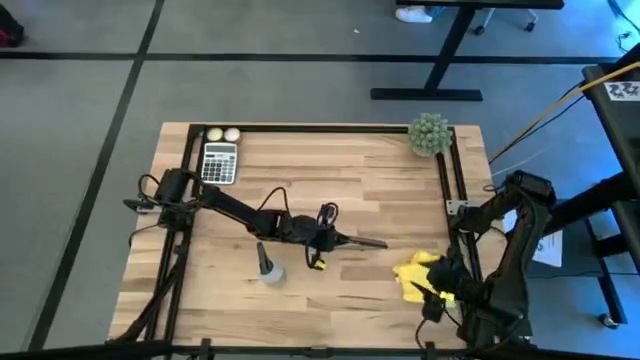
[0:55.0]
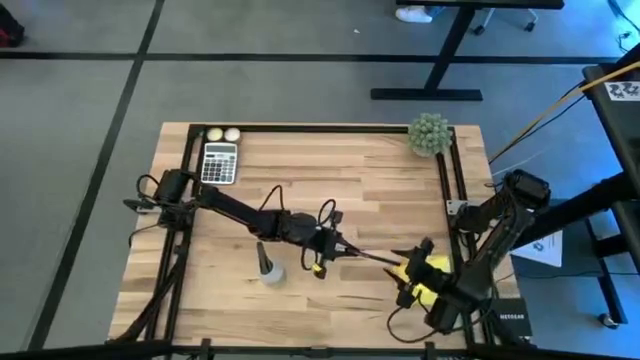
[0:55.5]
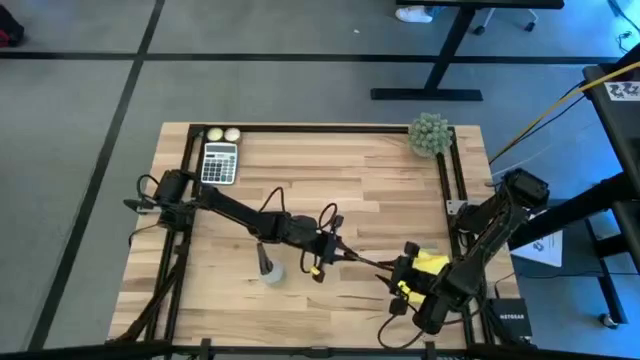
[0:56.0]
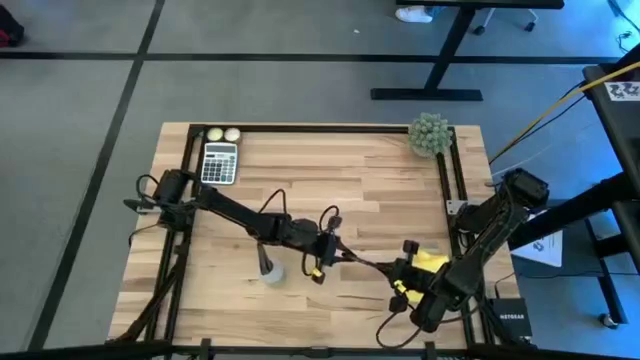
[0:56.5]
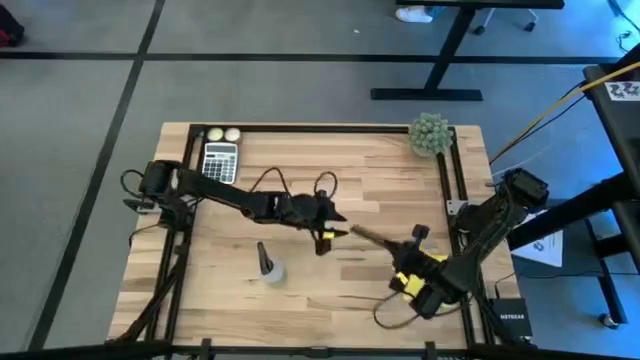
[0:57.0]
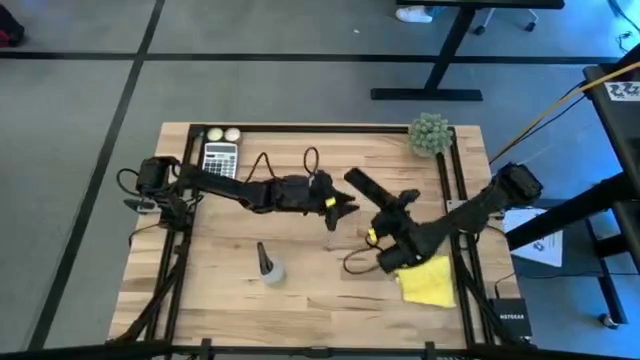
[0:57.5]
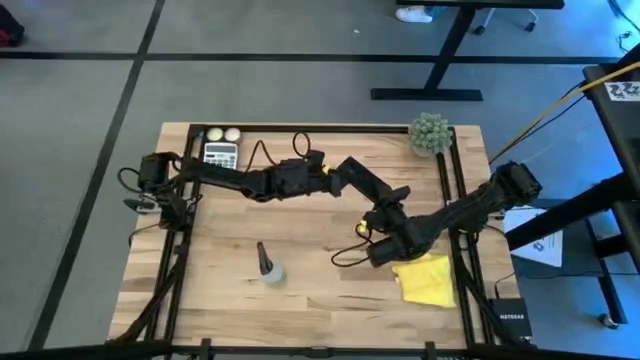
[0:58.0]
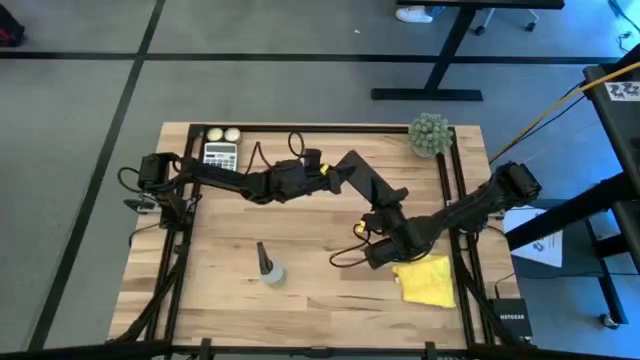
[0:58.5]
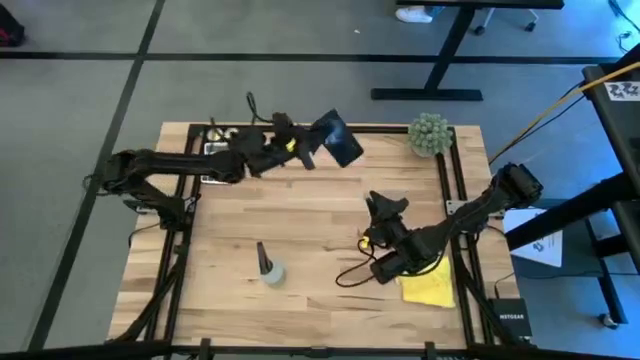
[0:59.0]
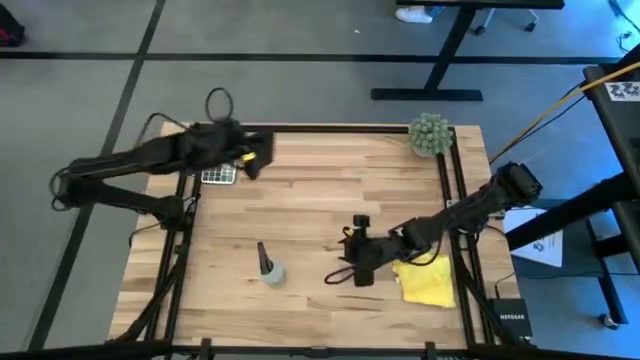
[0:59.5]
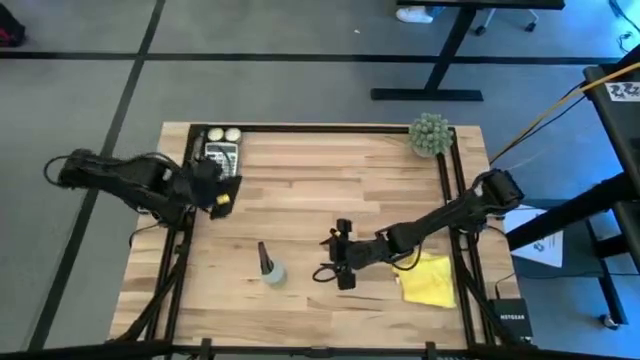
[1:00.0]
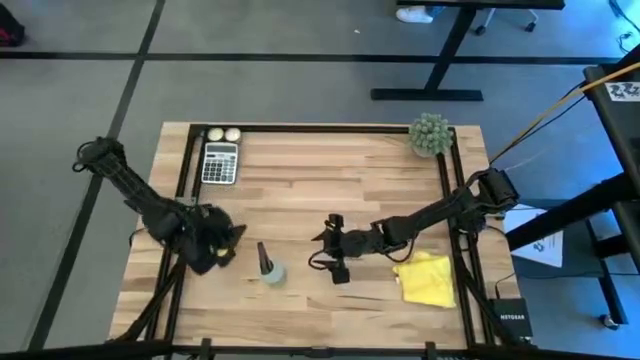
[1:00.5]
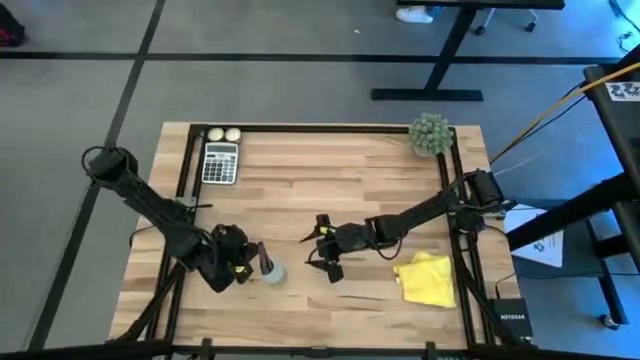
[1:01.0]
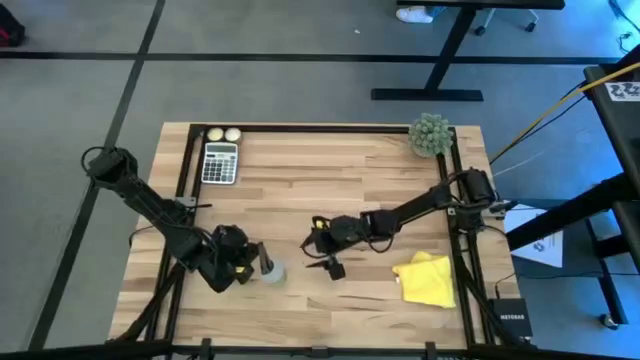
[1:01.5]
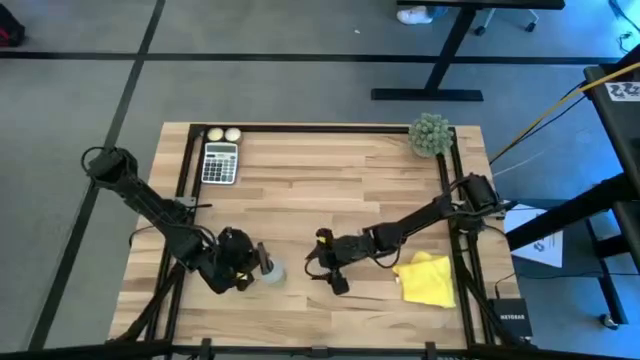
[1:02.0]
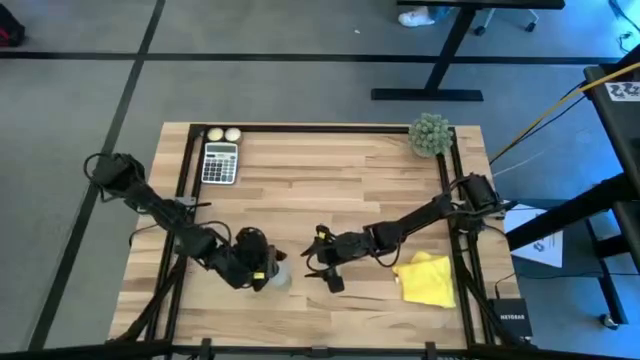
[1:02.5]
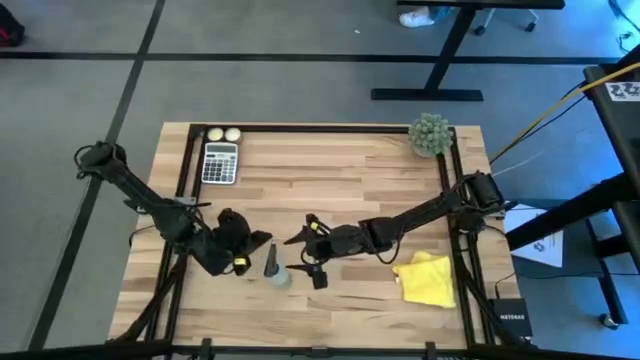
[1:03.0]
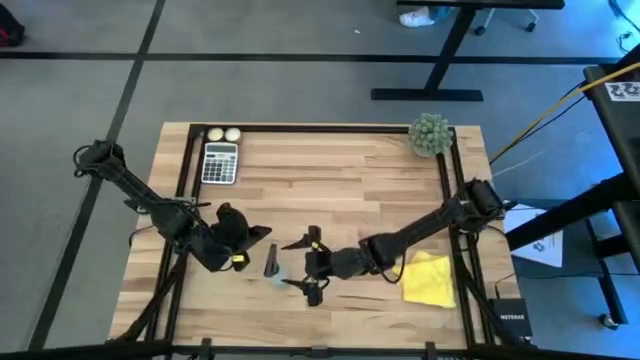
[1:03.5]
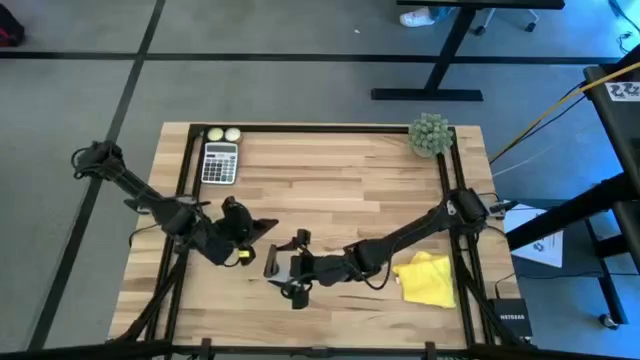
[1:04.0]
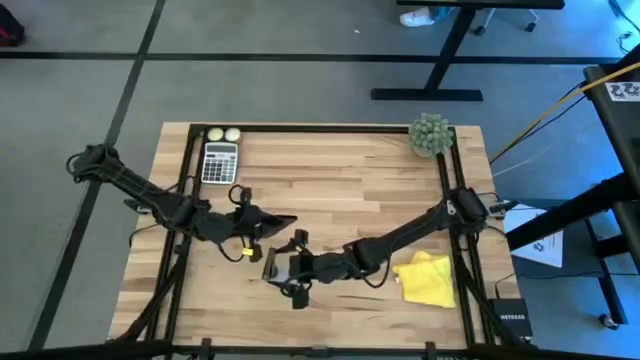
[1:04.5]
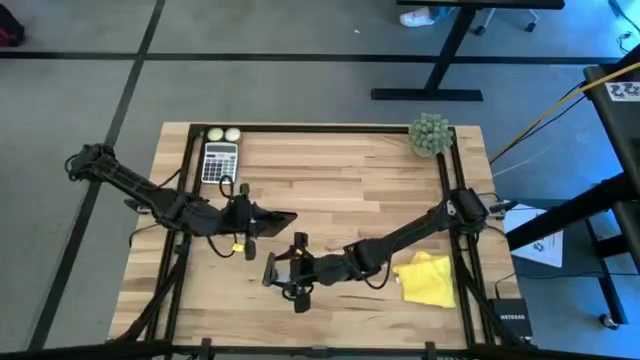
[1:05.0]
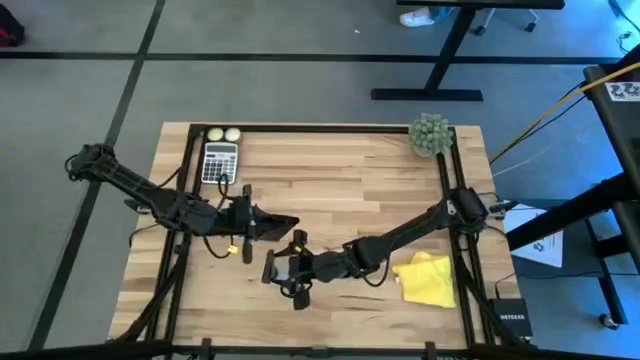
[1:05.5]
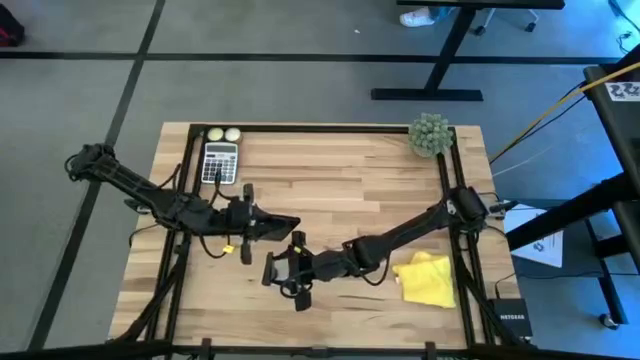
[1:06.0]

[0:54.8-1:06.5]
Task: Apply microfiber cloth
Spray the back of the black cellphone with the bottle cleaner

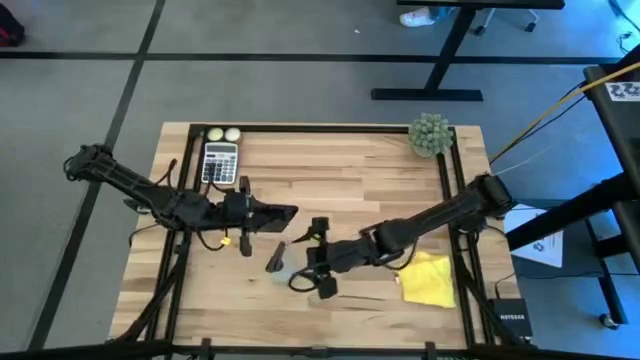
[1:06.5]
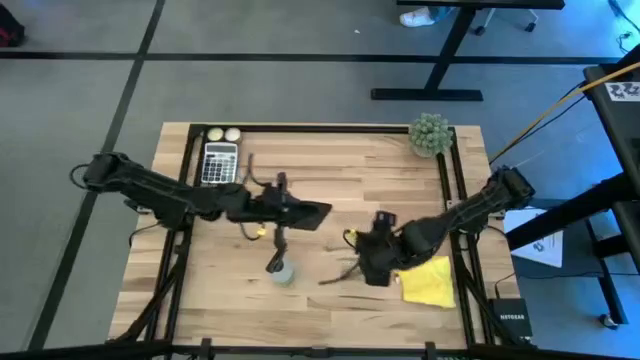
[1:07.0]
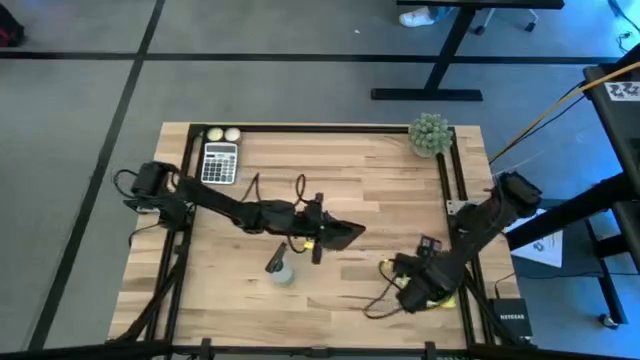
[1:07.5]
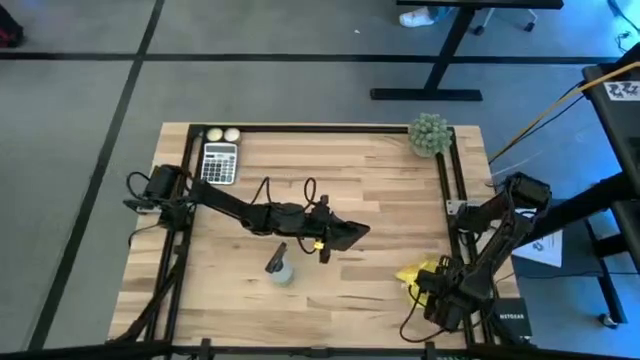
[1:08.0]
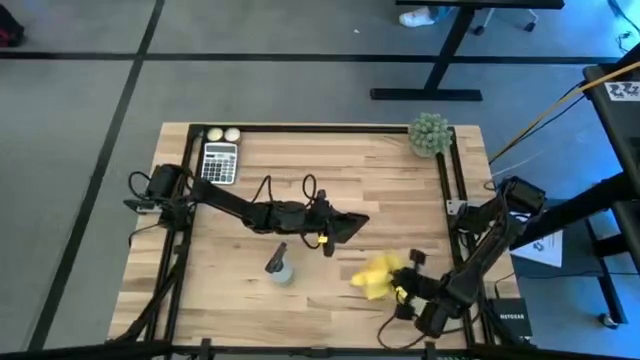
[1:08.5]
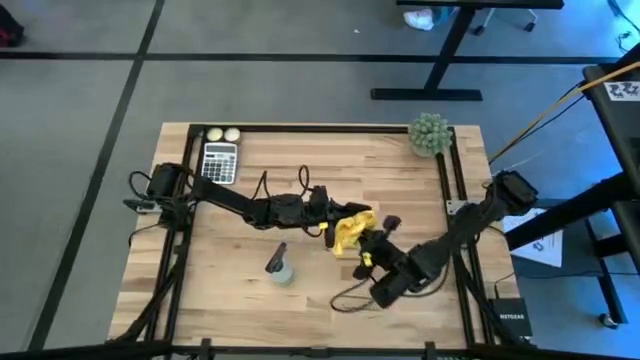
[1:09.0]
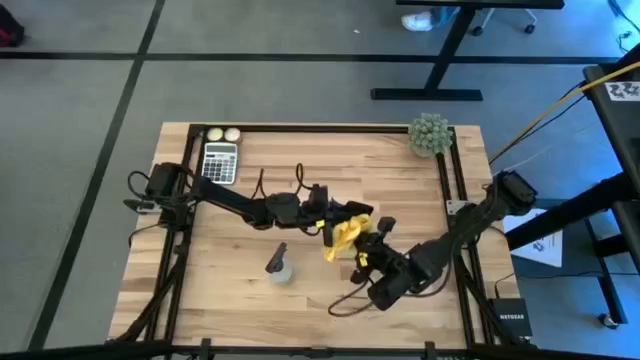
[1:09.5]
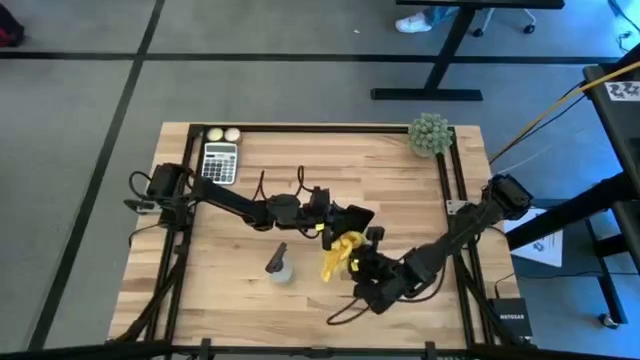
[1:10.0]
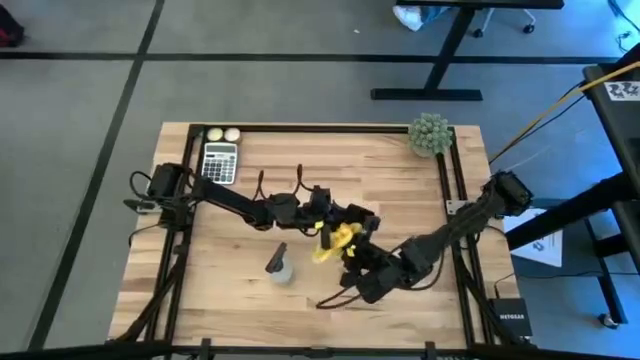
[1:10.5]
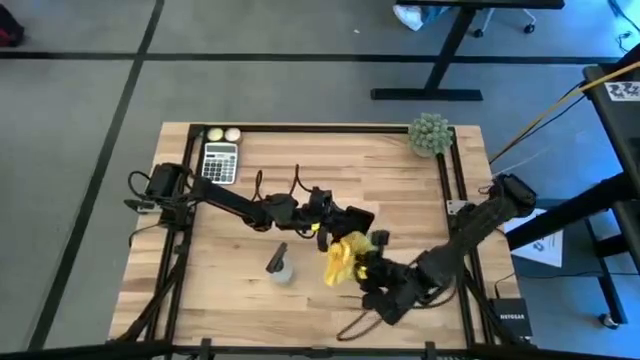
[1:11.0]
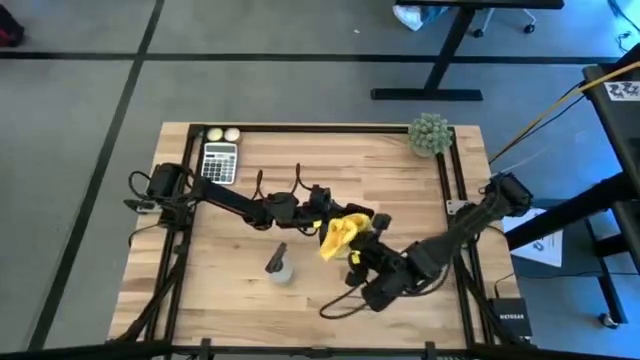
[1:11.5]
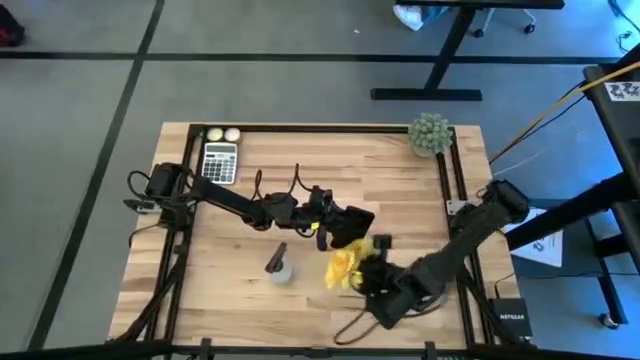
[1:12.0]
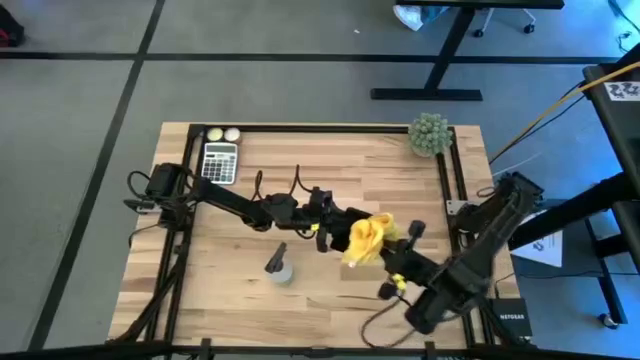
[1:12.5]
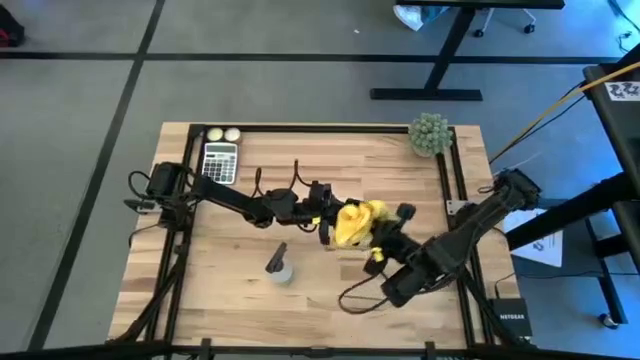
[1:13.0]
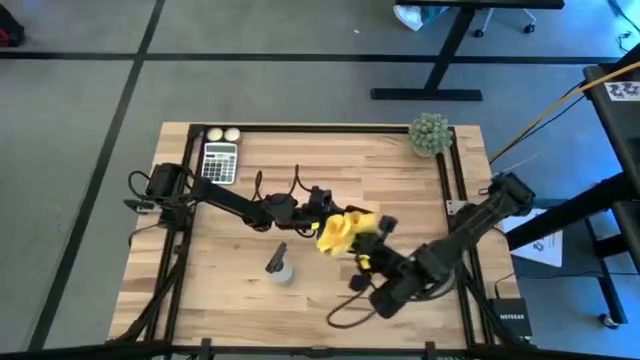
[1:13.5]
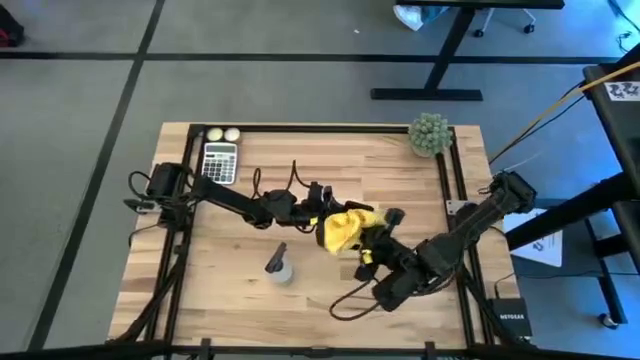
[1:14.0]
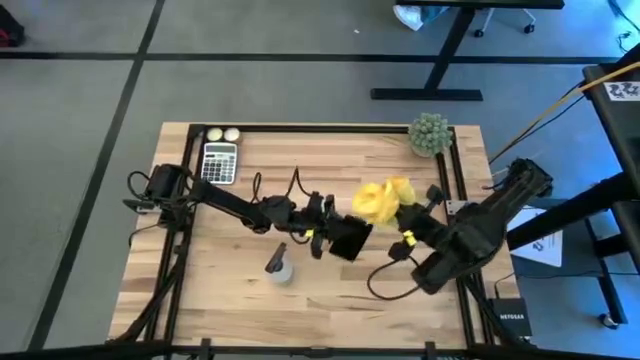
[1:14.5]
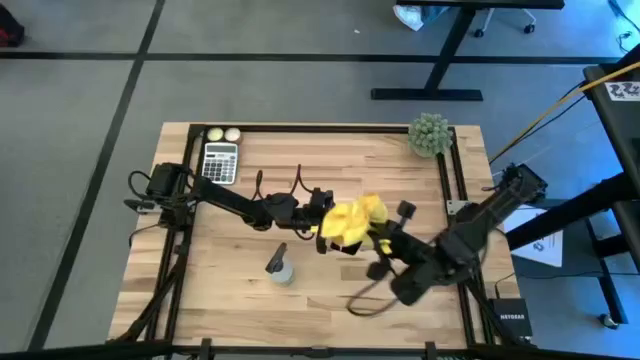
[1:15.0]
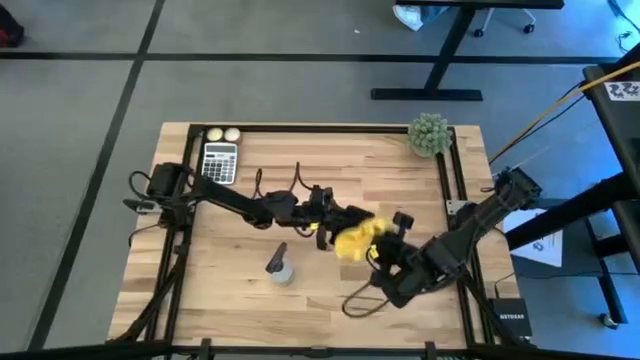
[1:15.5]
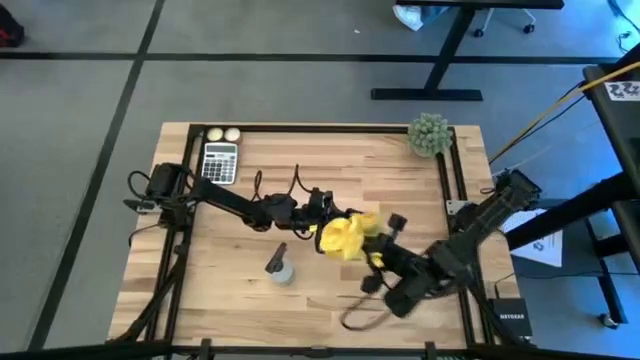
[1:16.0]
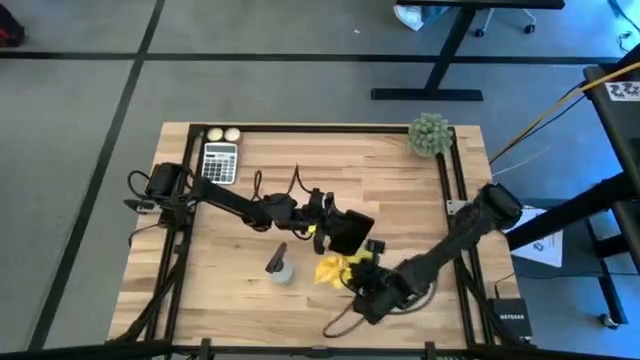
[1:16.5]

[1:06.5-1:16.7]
Wipe the back of the black cellphone with the yellow microfiber cloth
